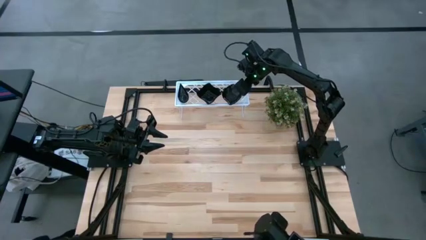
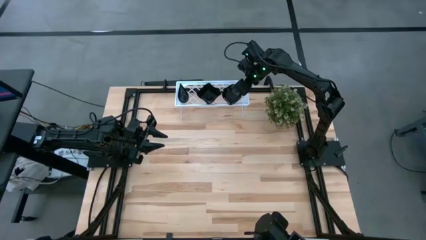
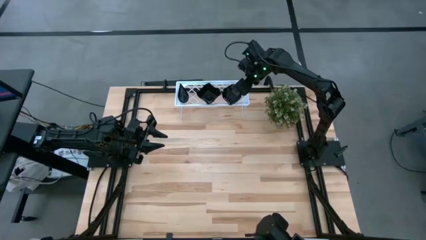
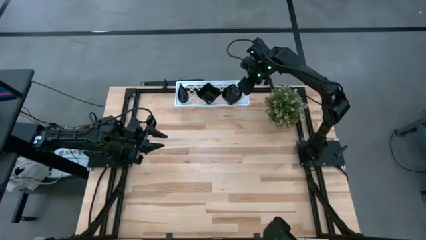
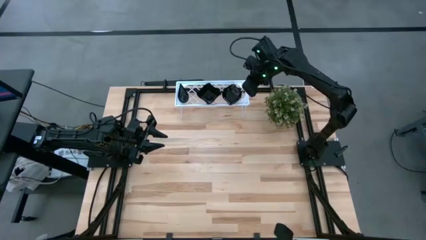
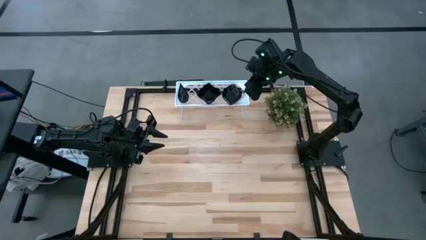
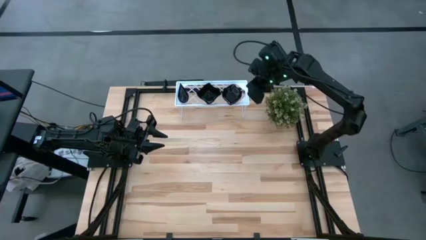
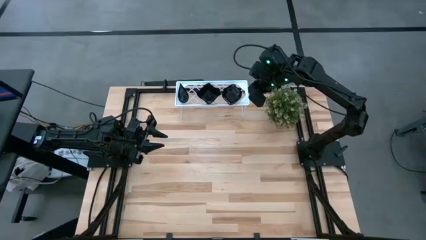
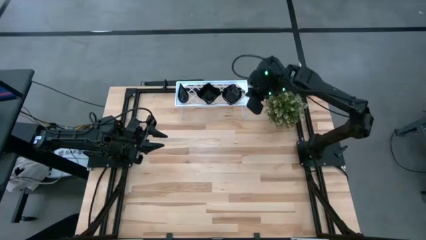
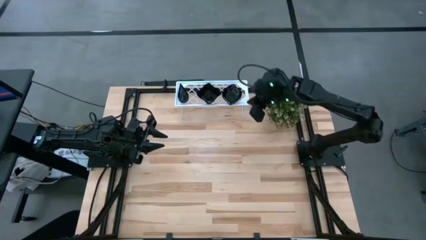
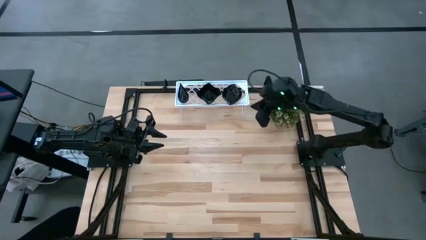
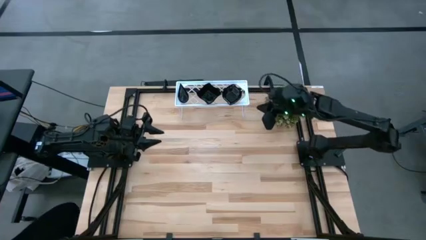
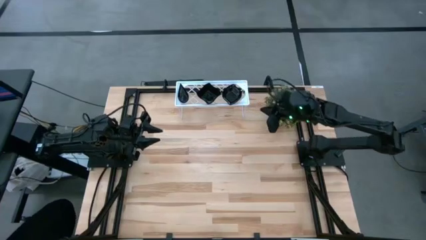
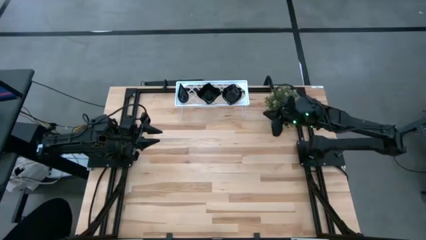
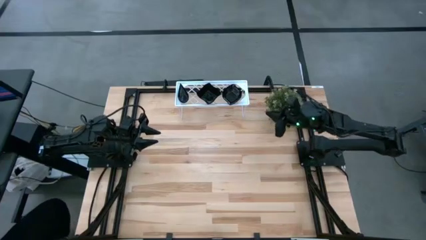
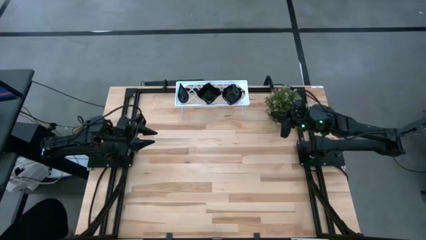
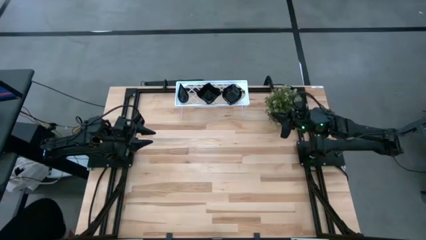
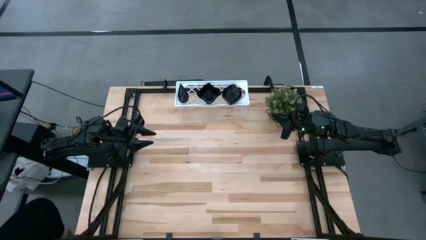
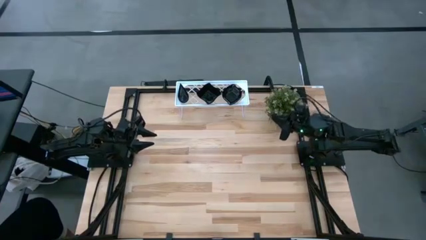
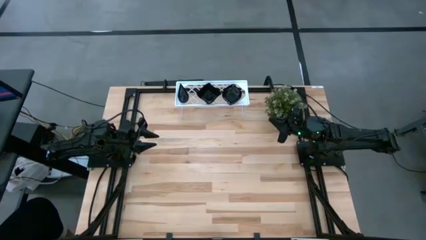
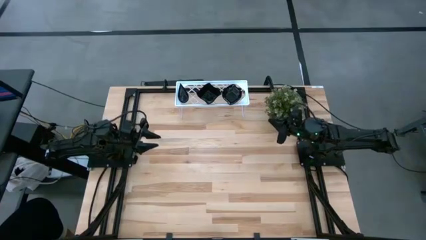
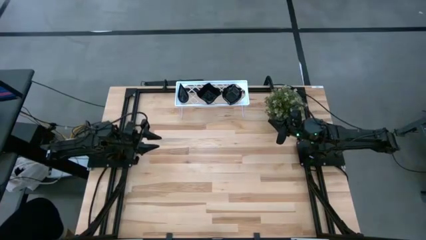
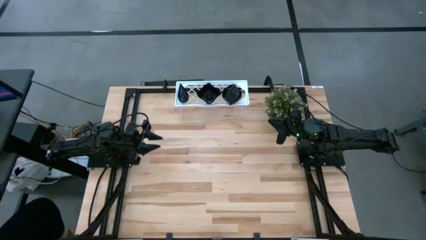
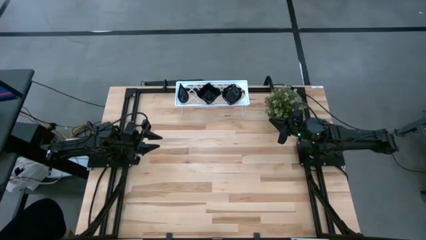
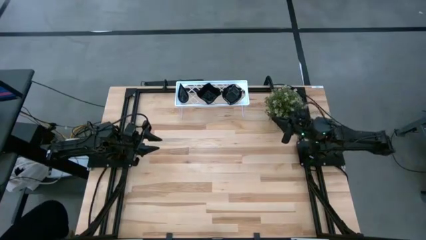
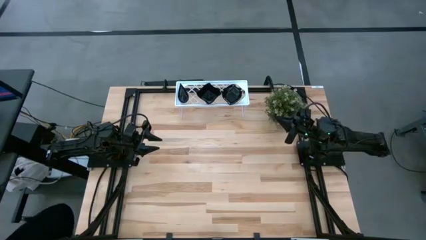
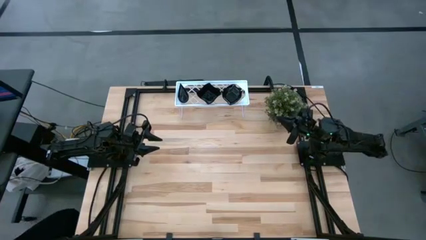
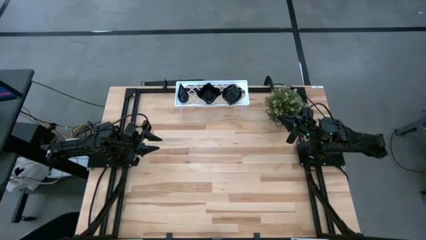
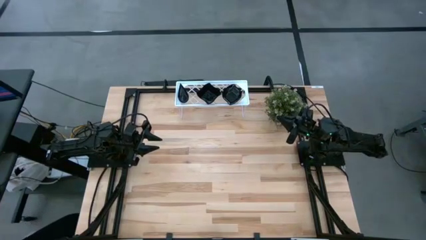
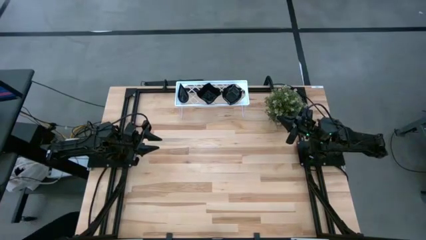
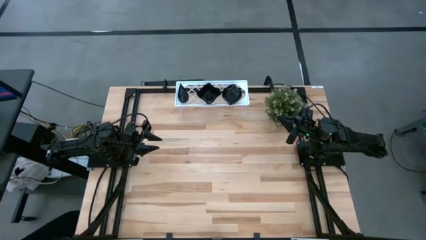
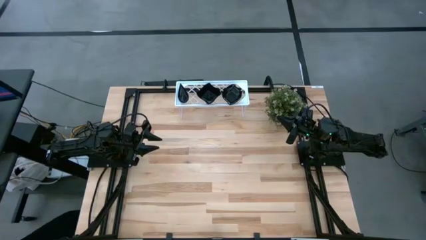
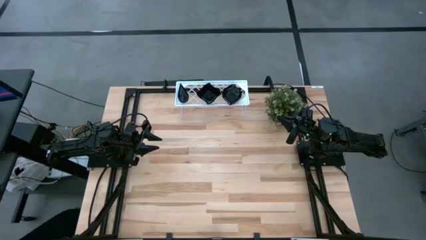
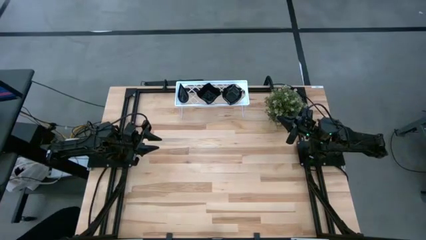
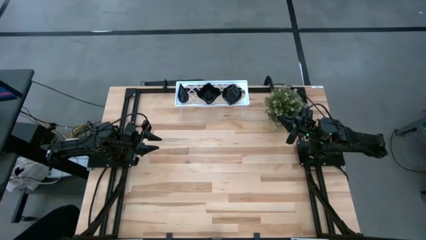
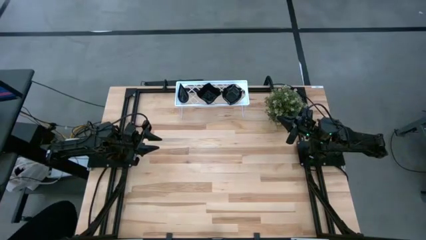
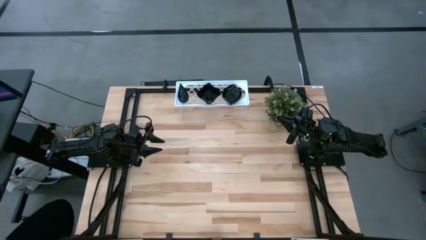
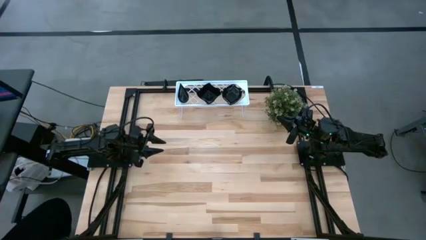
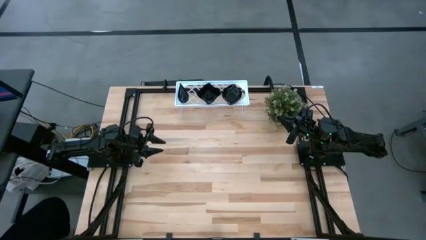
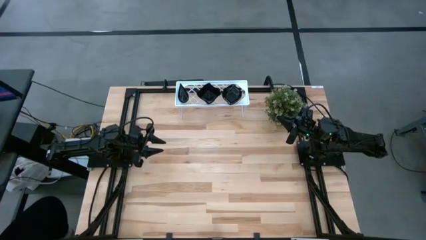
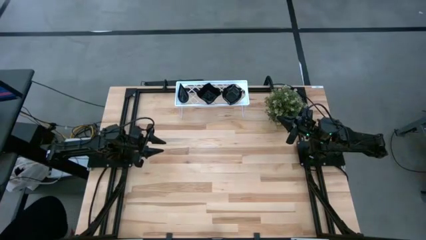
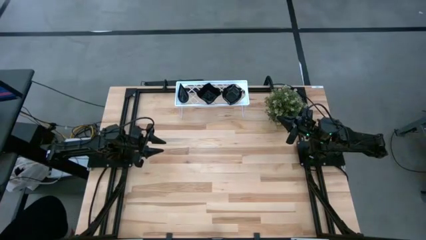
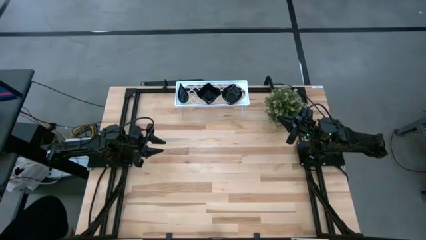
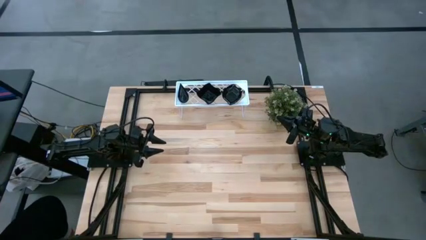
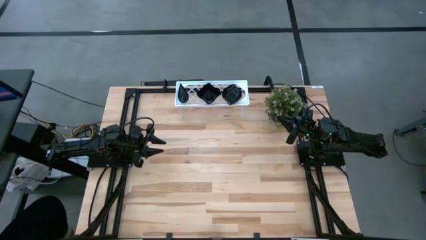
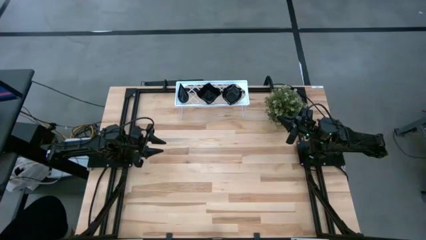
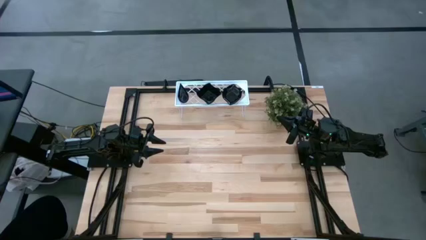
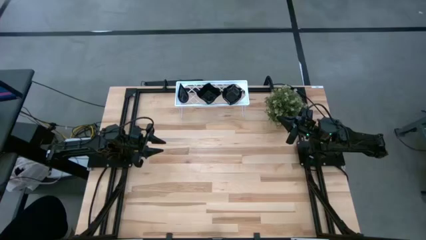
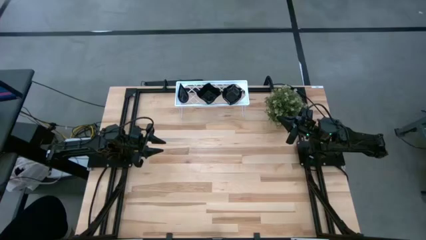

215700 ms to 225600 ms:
Task: Pick & Place Mini shaped plates
Return to Home Position

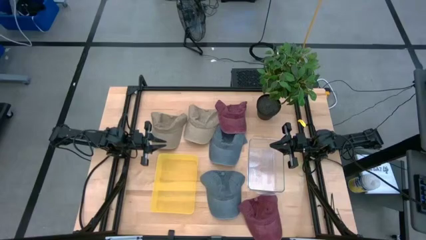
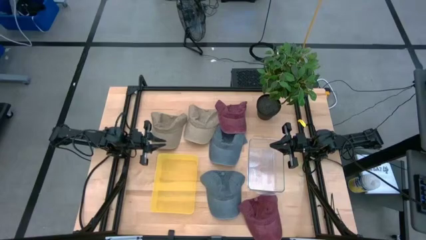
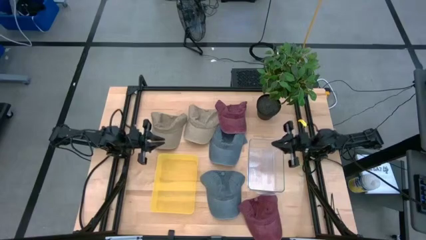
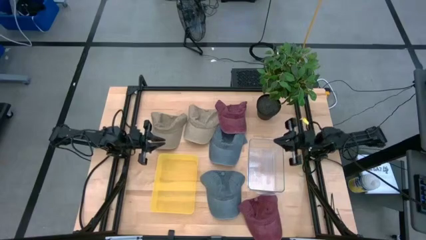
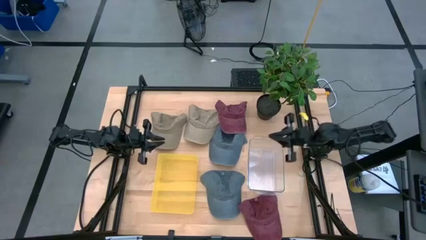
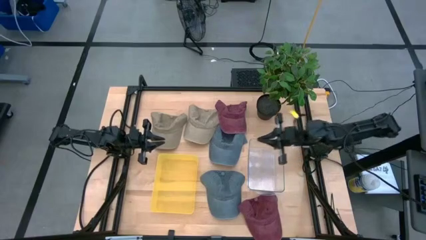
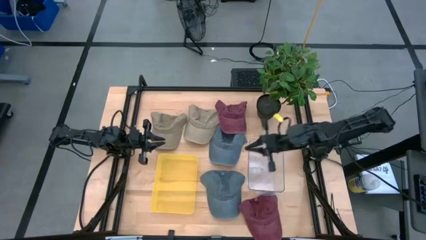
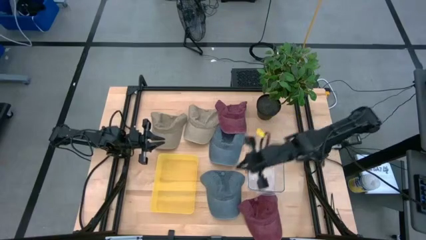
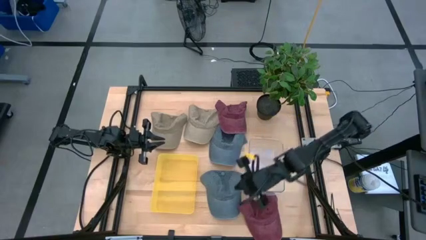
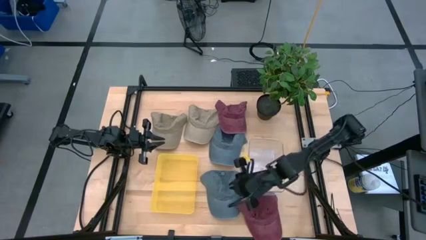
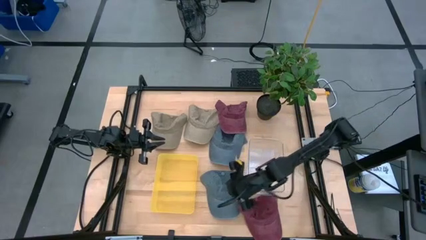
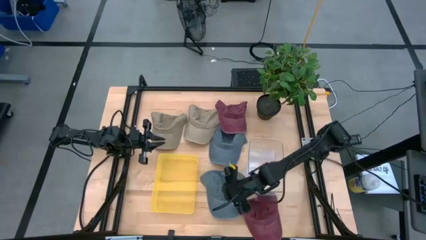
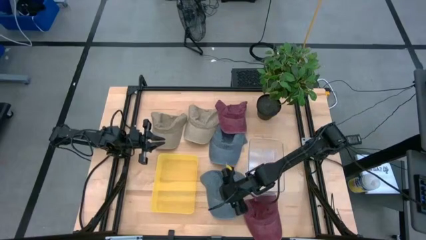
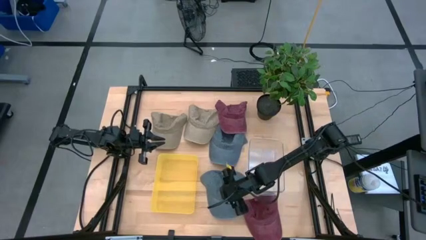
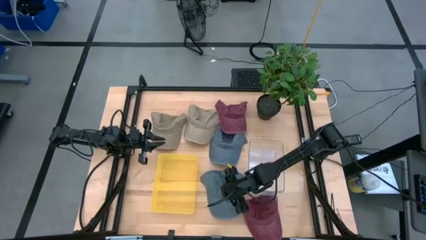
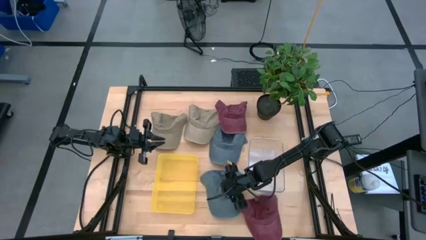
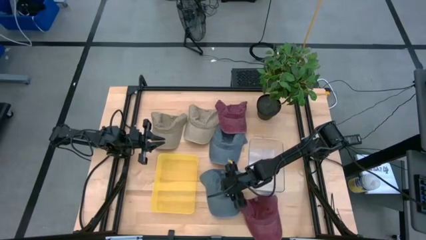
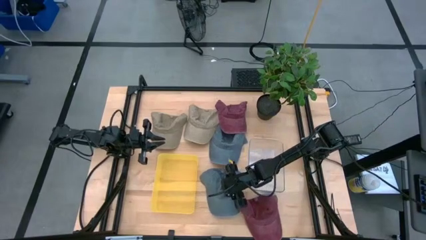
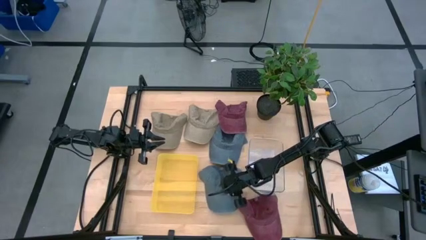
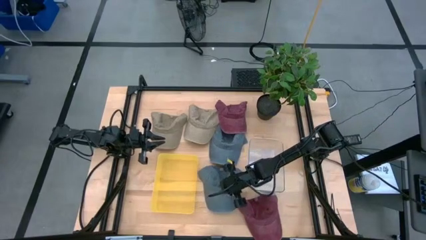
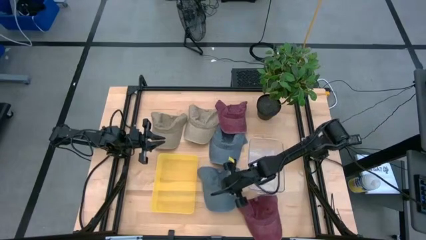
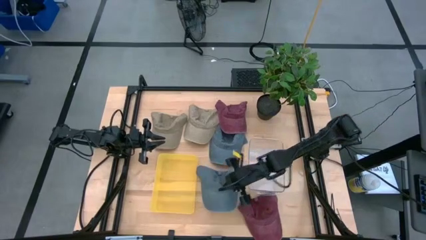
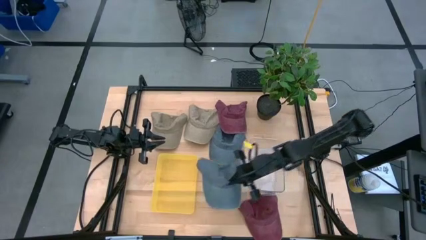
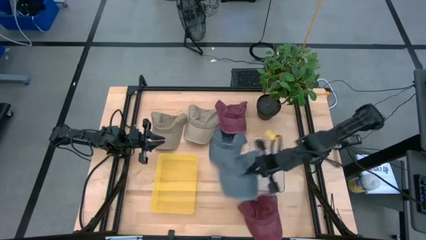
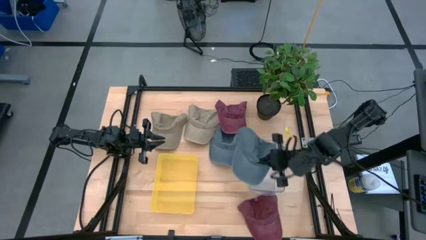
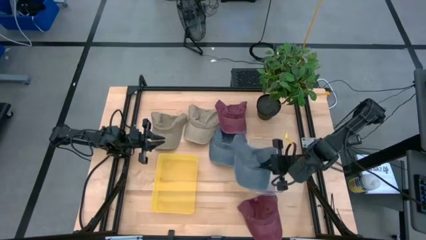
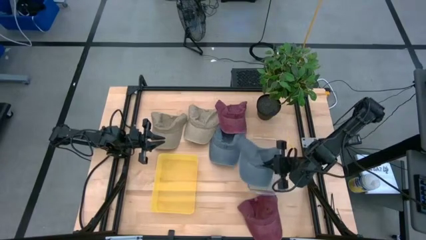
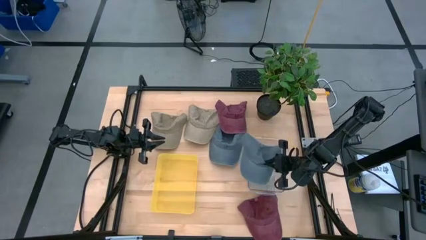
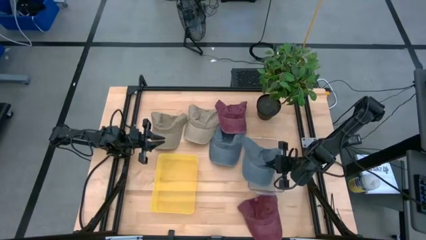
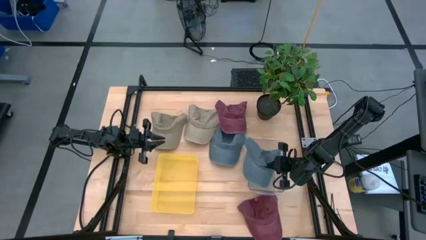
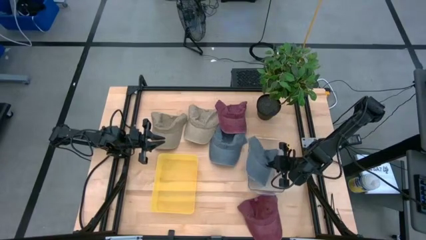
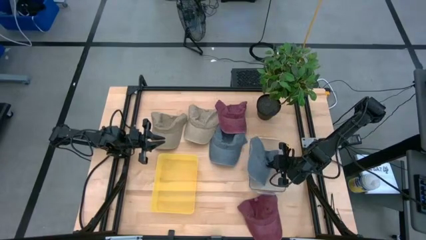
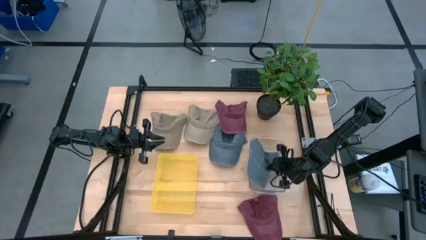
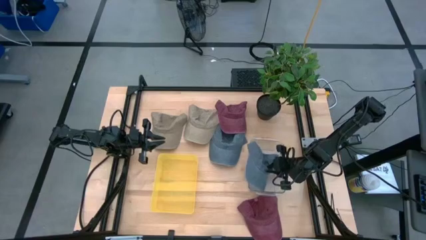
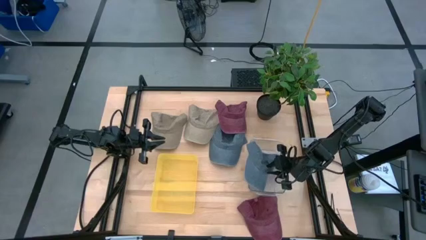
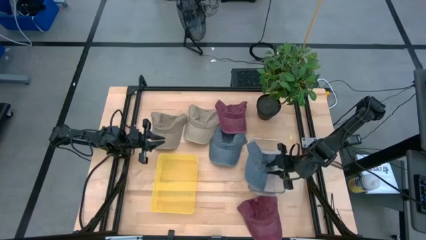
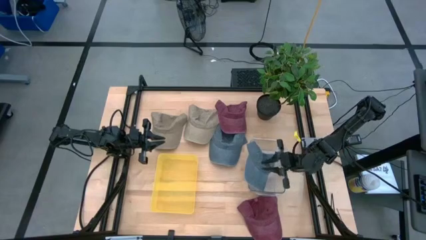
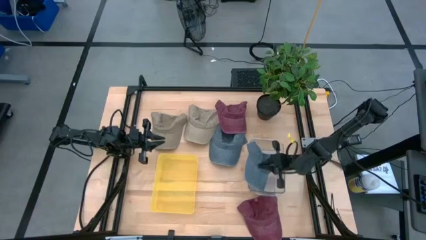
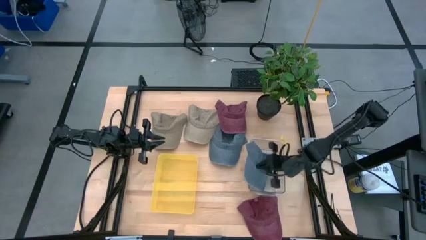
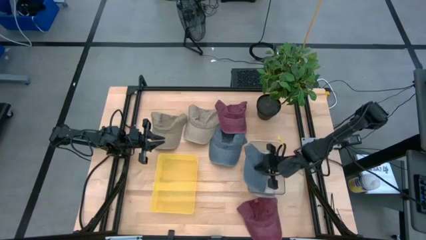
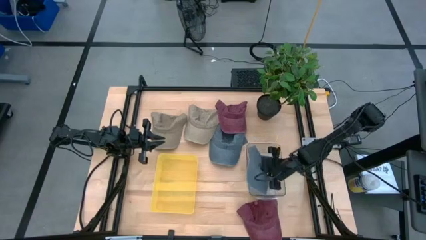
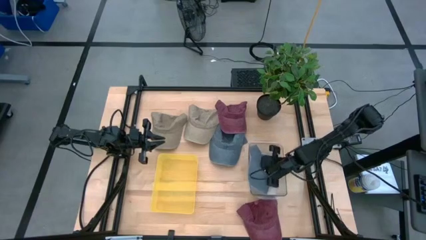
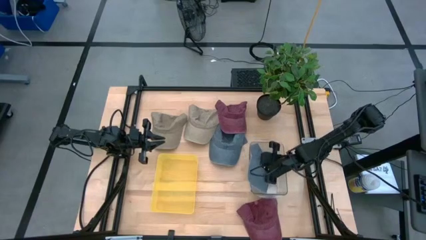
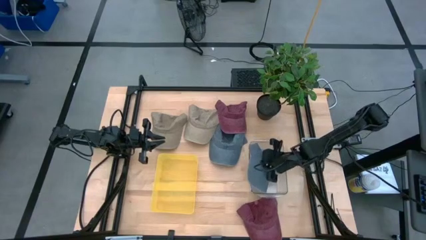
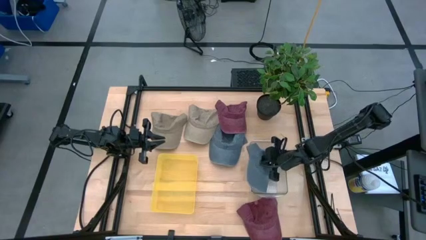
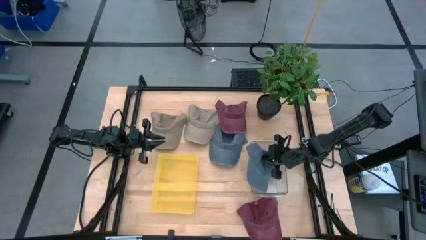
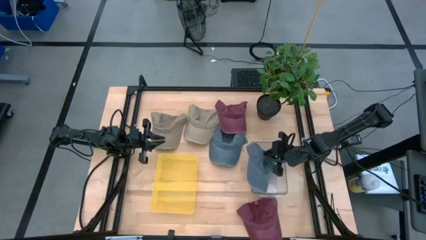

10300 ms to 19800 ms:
Task: Pick & Place hat
Put the bottom blue cap into the transparent bin
